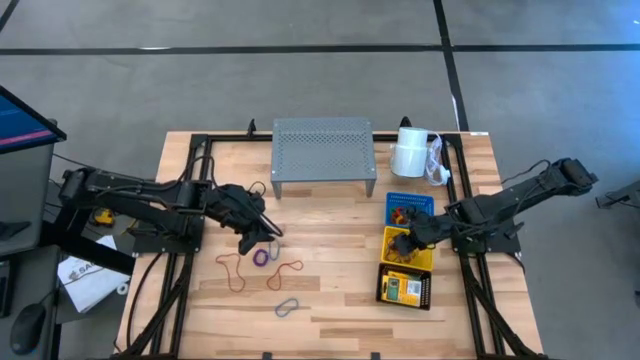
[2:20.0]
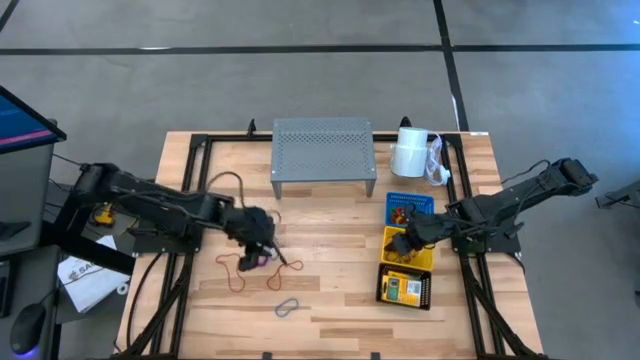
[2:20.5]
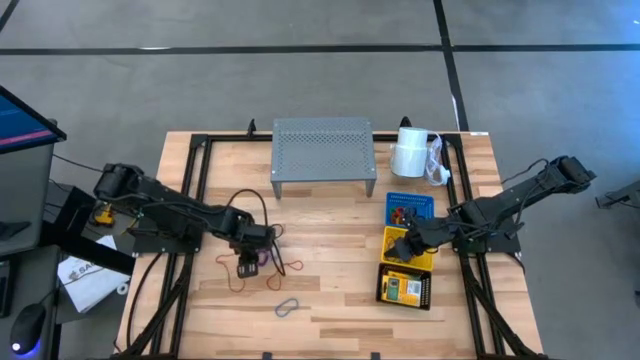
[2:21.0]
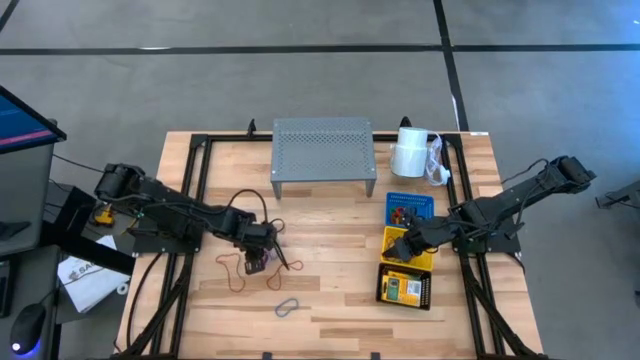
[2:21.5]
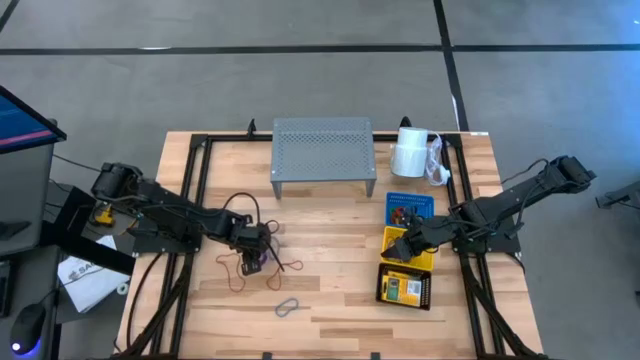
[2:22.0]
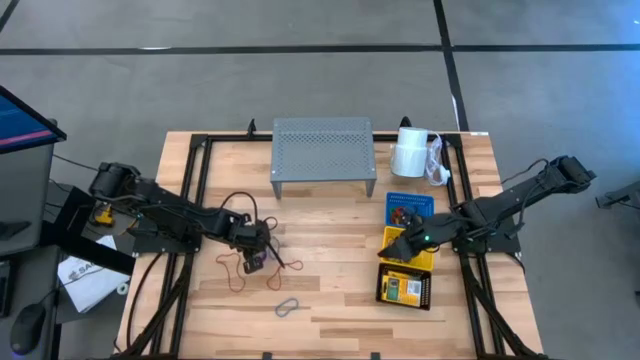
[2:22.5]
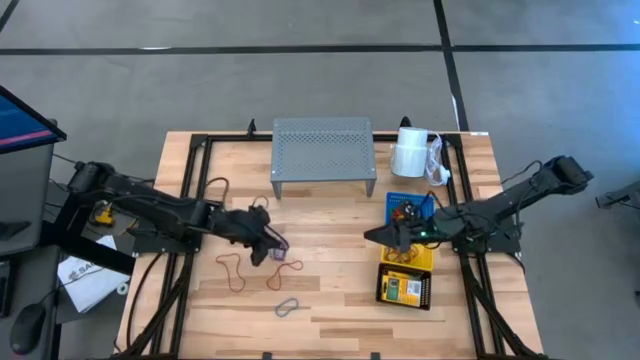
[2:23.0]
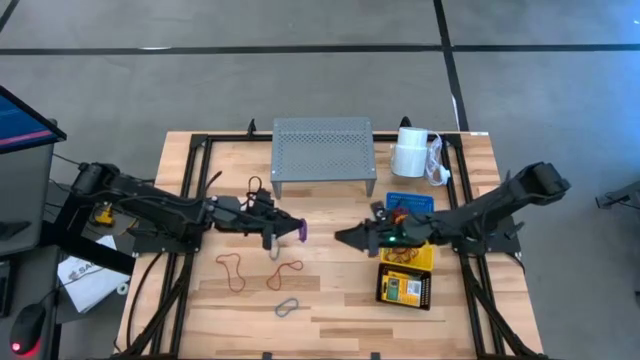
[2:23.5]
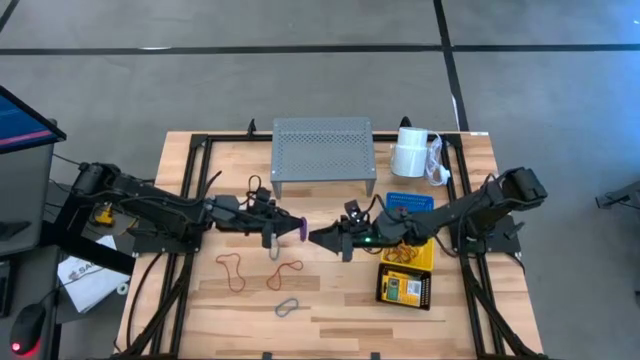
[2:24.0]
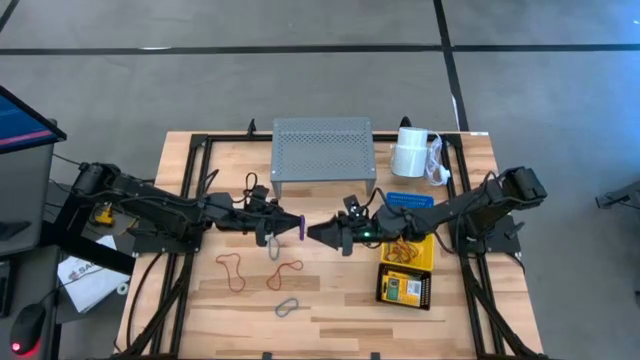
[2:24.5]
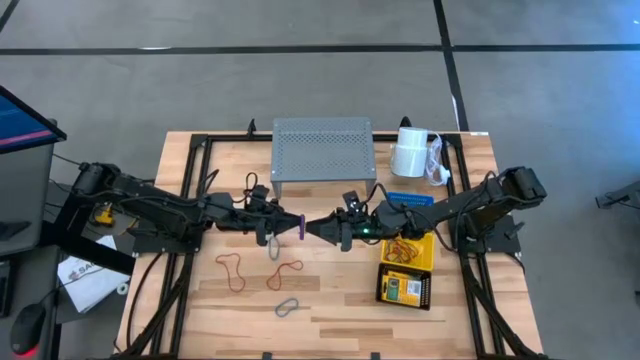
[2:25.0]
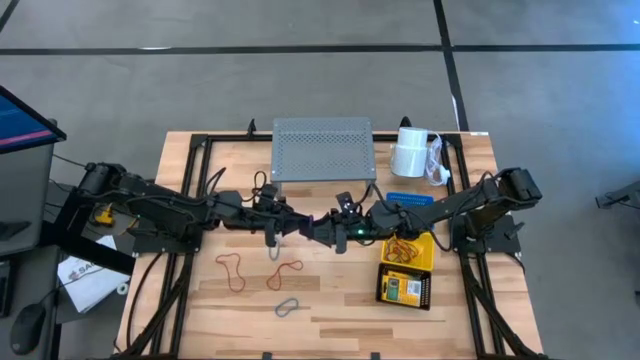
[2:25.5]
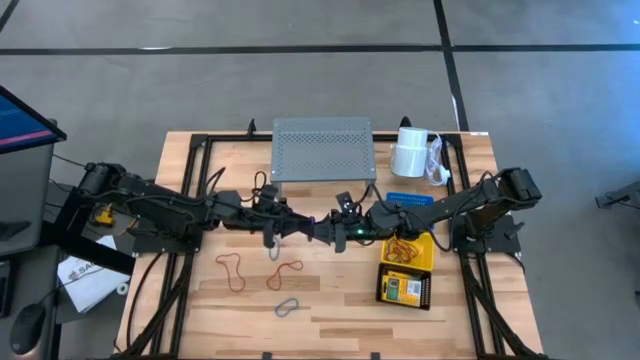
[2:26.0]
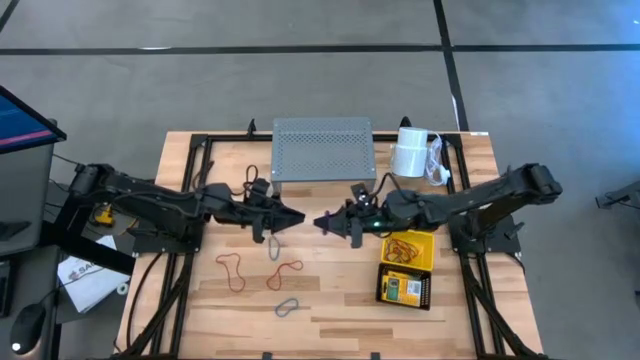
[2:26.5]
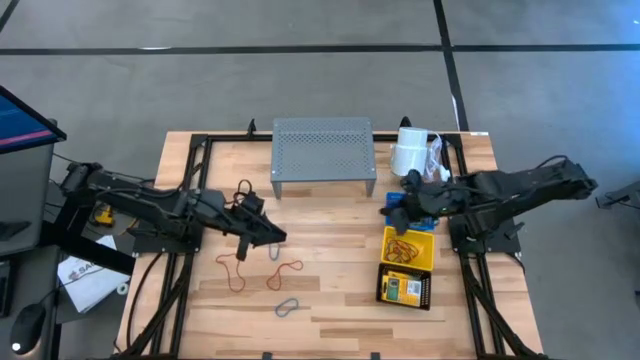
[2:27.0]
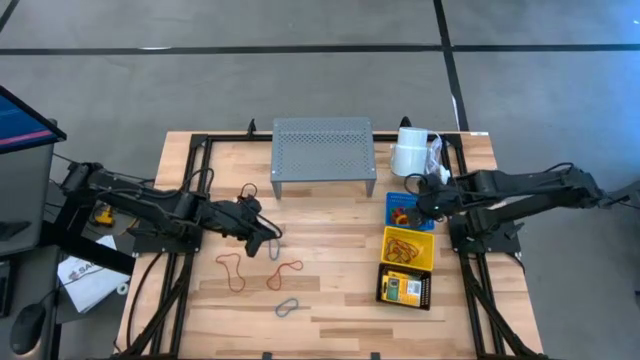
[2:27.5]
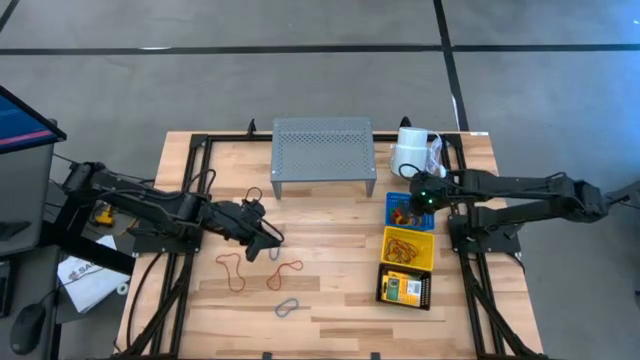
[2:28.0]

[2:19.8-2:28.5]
Task: Pick & Place Office Desk Supplies
Put the purple spring keychain into the blue basket

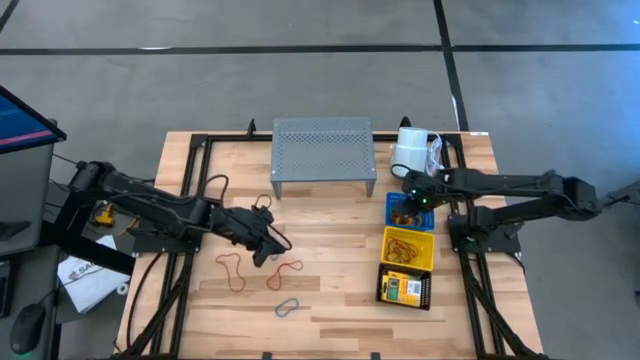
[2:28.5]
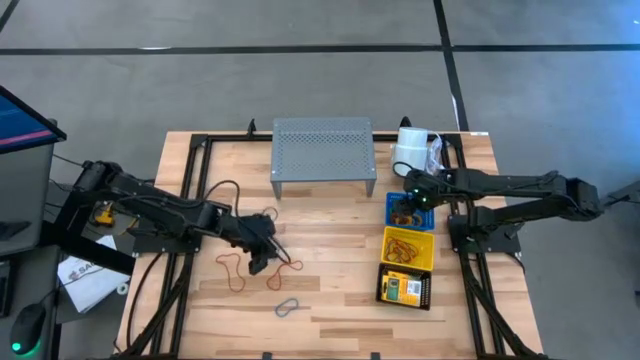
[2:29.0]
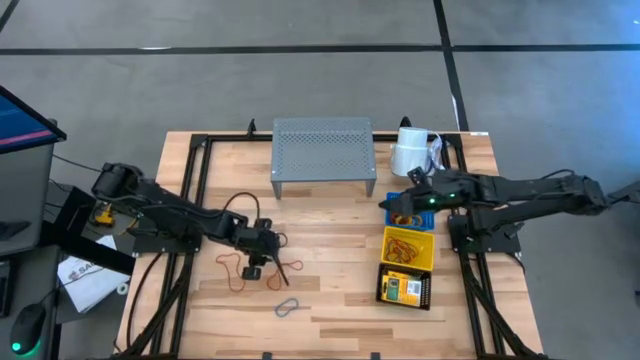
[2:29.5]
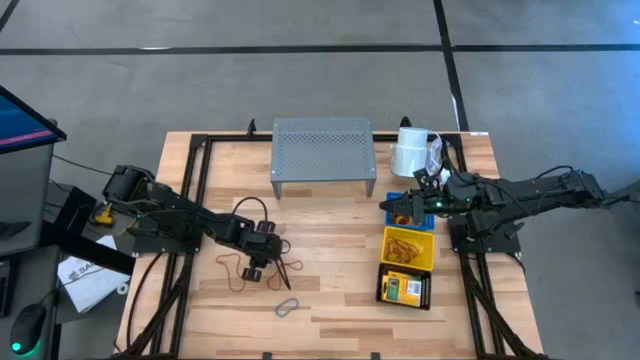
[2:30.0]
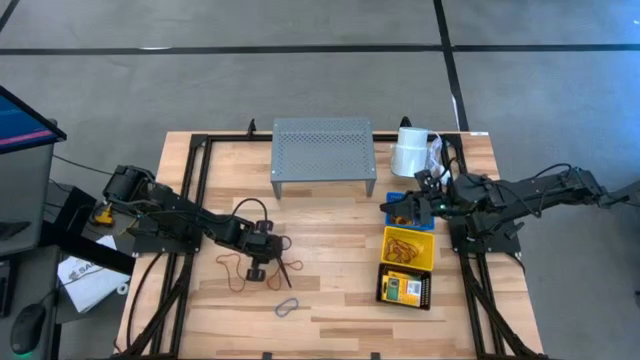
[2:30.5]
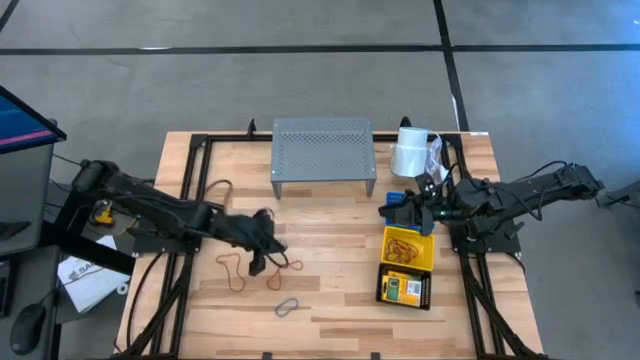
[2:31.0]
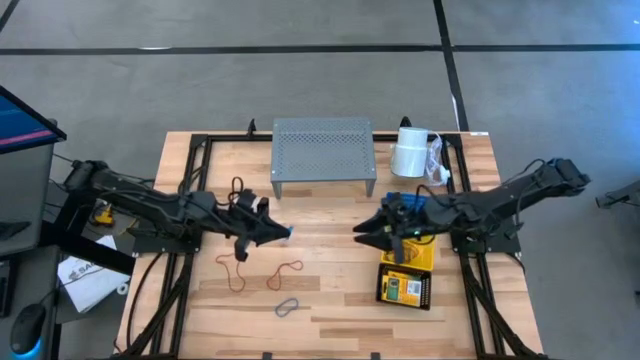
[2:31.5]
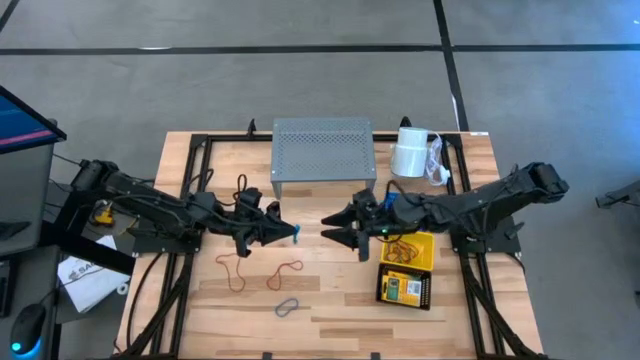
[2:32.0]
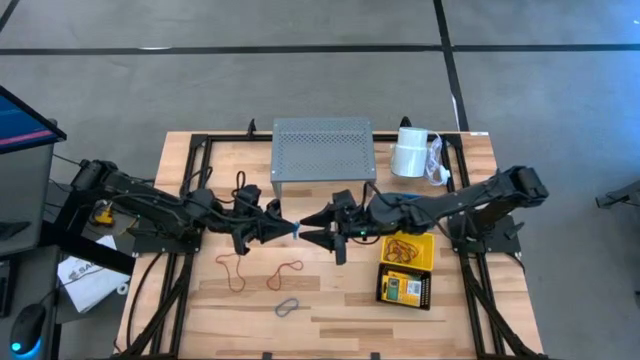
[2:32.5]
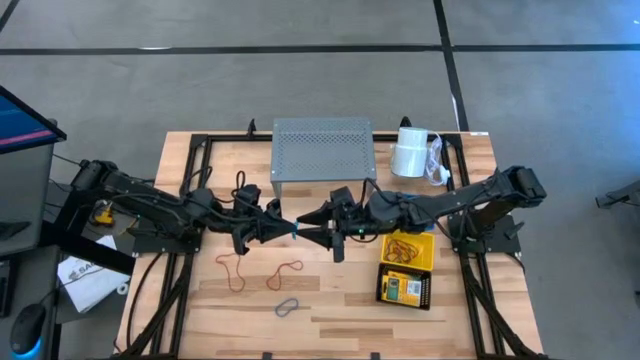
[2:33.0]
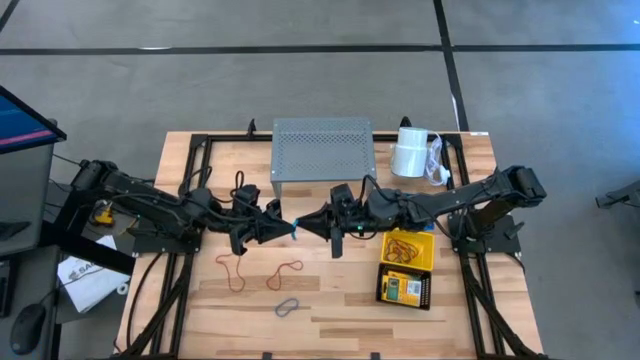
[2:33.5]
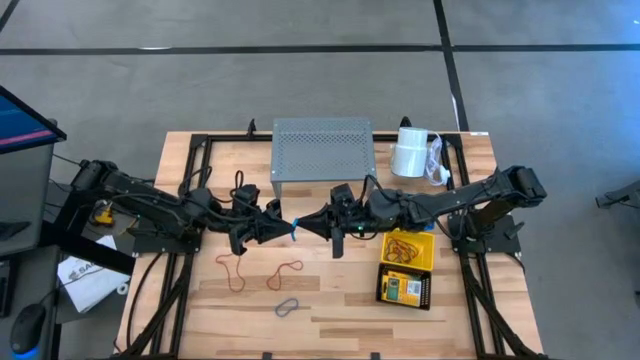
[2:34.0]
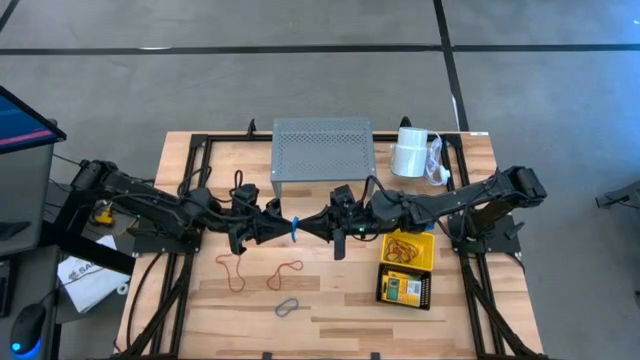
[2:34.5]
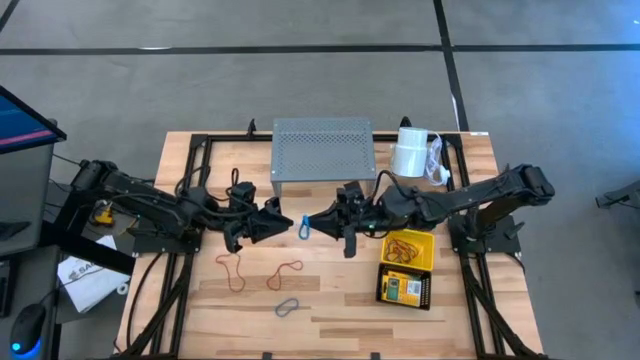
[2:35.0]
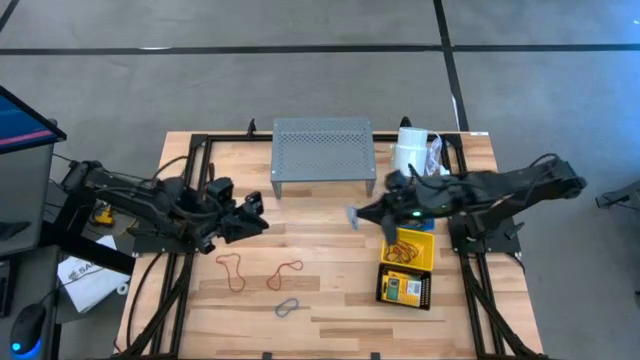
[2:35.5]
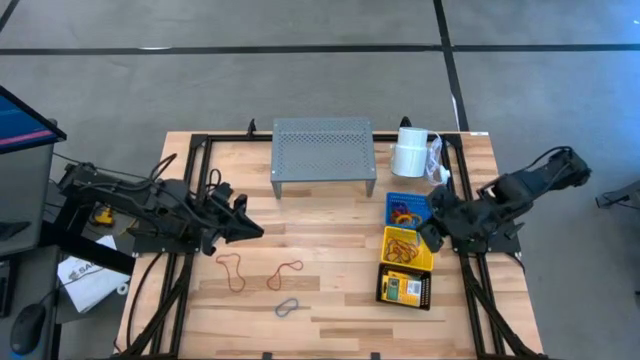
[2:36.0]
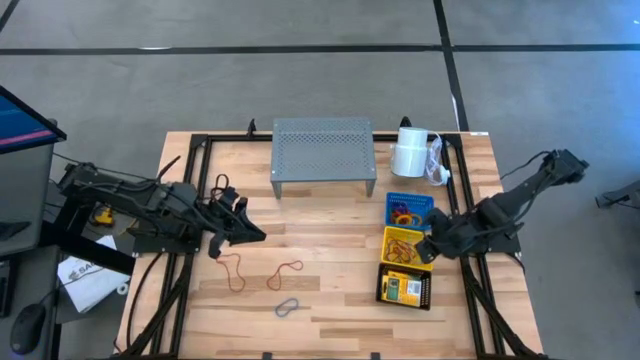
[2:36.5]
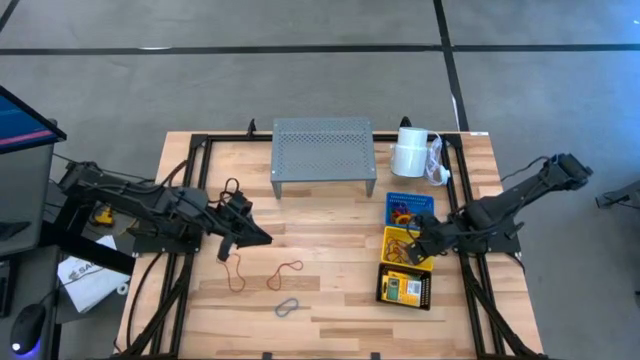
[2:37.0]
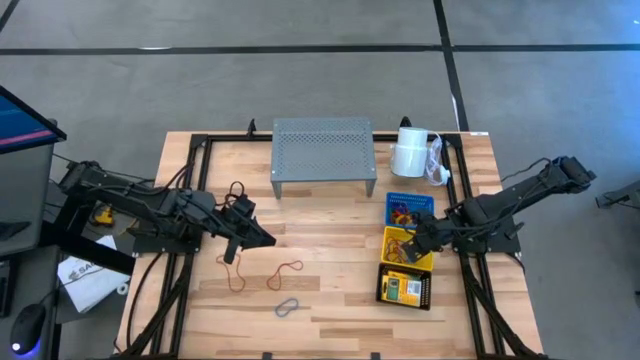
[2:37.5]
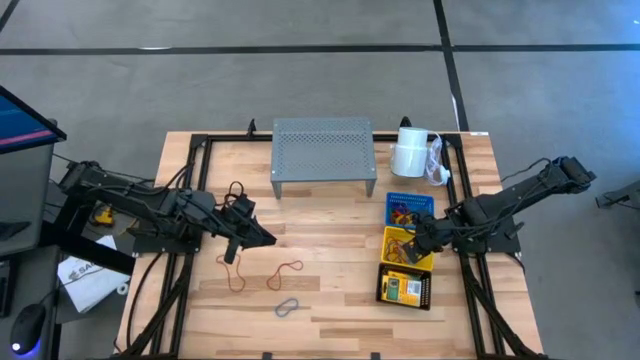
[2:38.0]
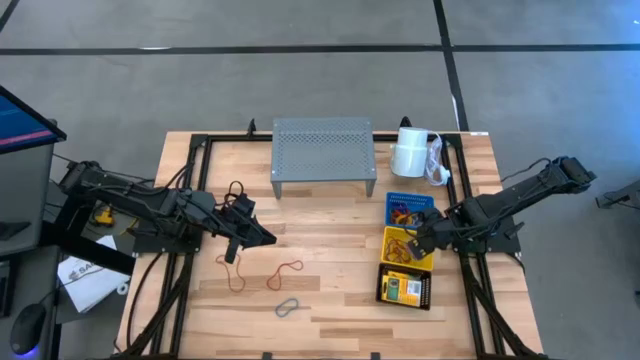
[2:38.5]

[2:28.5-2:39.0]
Put the blue rubber band into the yellow basket
